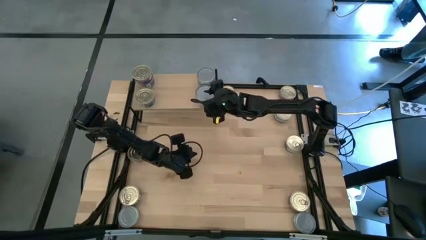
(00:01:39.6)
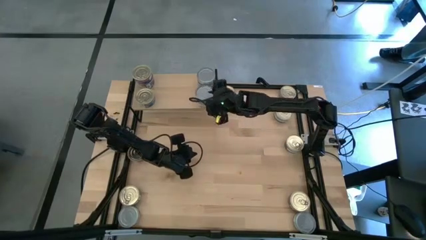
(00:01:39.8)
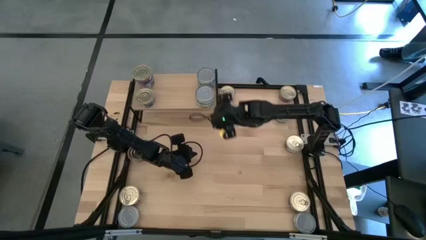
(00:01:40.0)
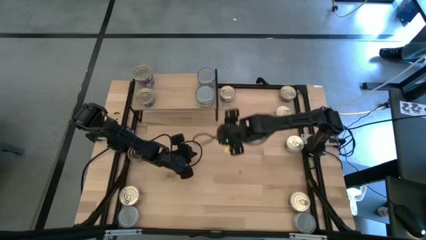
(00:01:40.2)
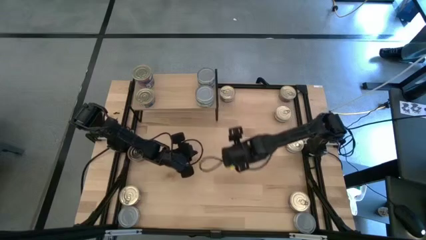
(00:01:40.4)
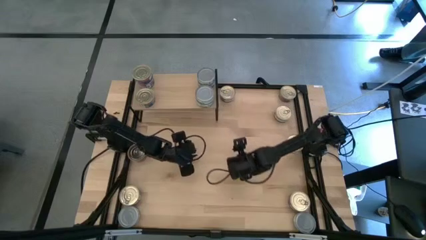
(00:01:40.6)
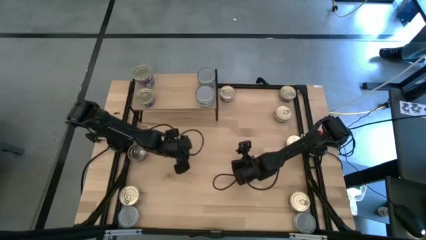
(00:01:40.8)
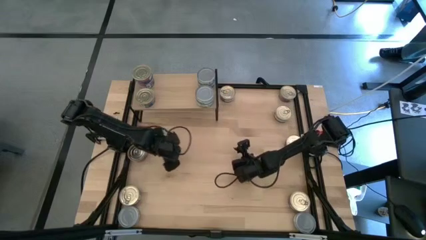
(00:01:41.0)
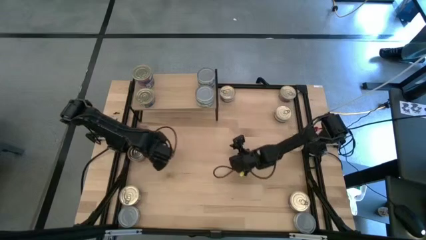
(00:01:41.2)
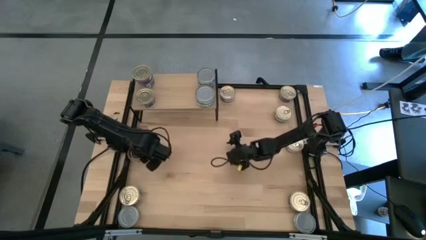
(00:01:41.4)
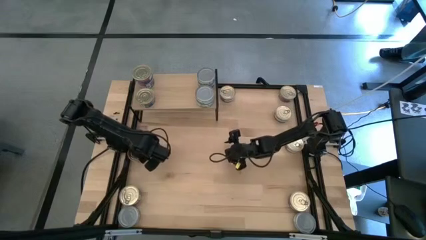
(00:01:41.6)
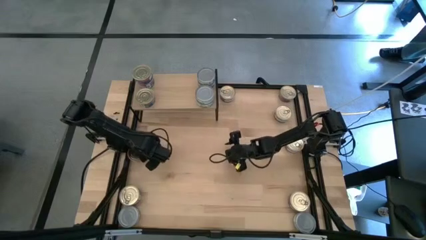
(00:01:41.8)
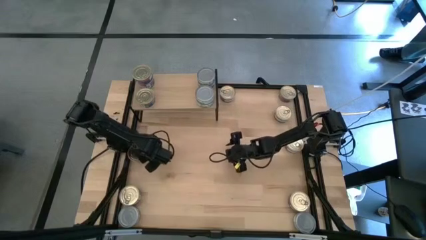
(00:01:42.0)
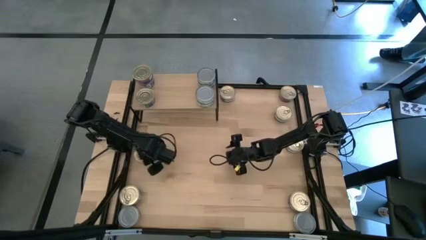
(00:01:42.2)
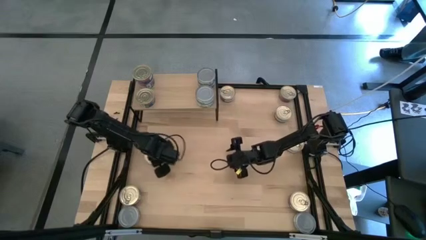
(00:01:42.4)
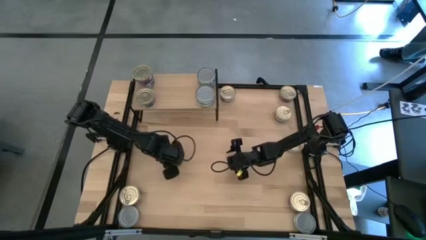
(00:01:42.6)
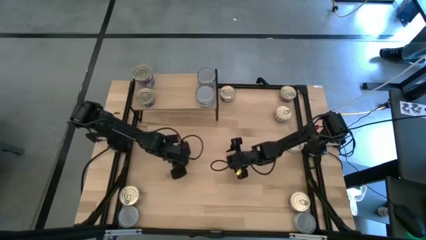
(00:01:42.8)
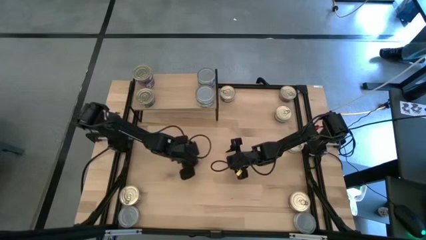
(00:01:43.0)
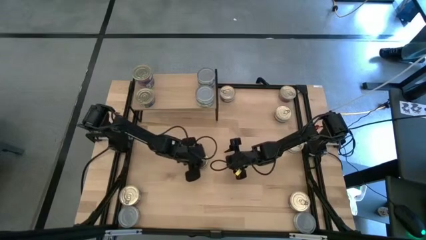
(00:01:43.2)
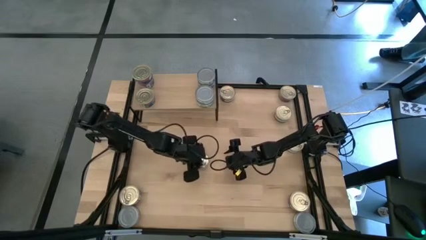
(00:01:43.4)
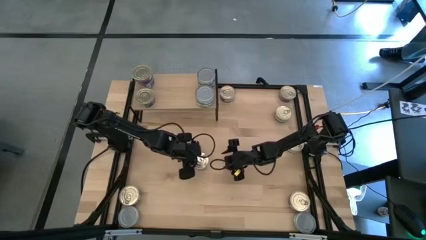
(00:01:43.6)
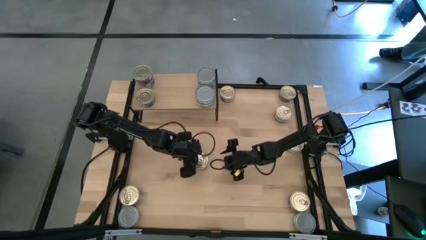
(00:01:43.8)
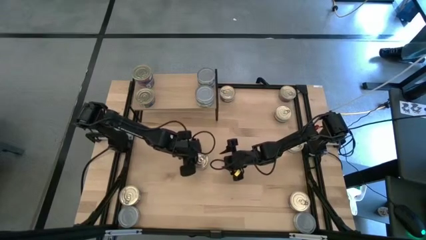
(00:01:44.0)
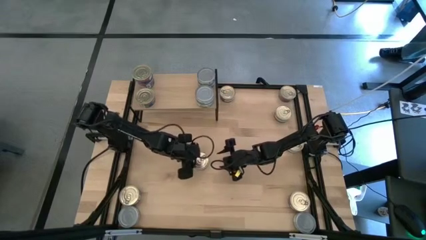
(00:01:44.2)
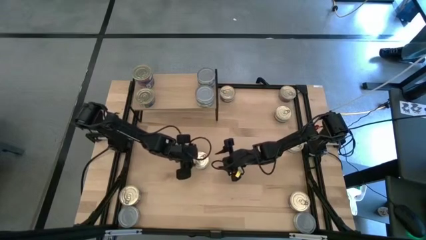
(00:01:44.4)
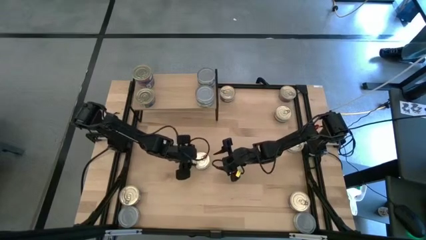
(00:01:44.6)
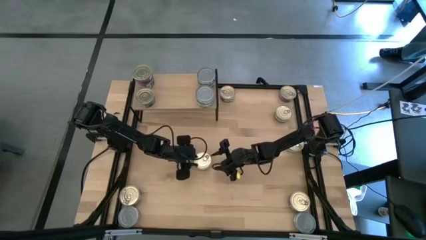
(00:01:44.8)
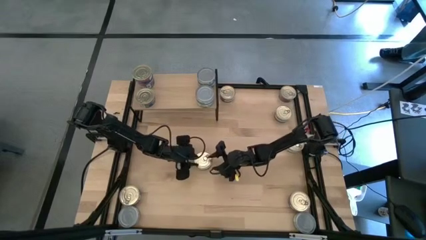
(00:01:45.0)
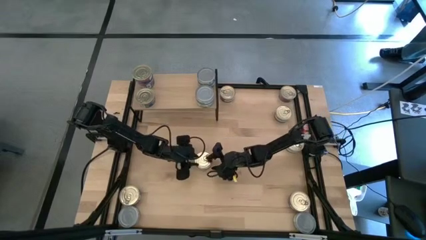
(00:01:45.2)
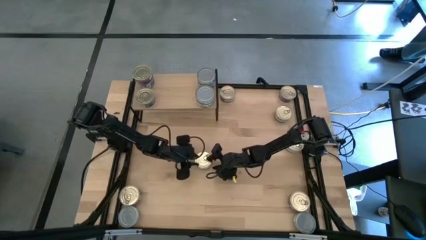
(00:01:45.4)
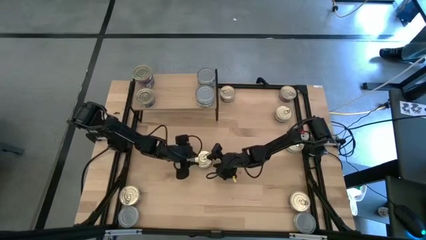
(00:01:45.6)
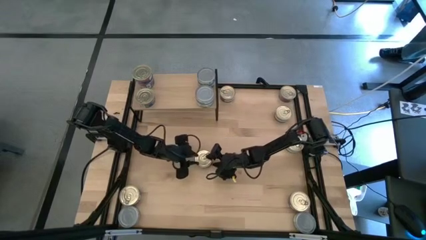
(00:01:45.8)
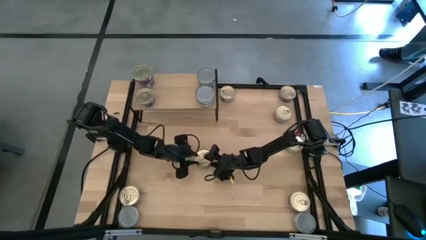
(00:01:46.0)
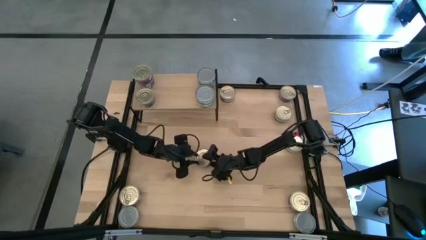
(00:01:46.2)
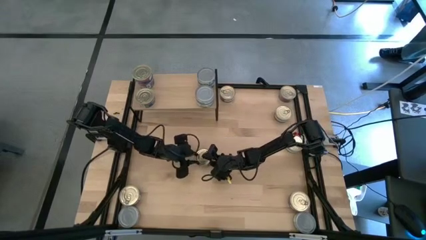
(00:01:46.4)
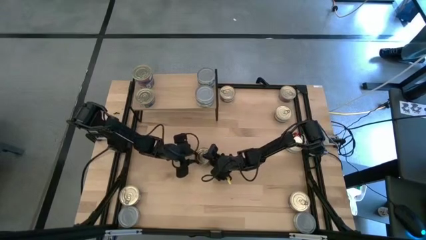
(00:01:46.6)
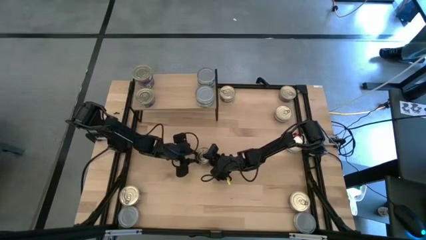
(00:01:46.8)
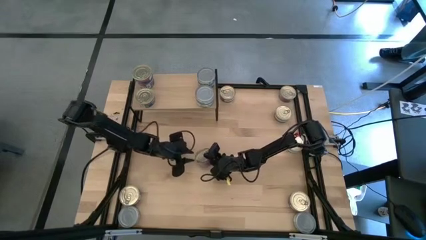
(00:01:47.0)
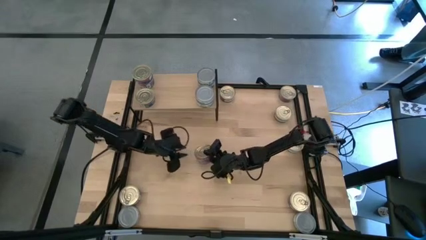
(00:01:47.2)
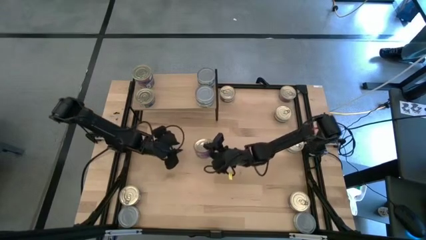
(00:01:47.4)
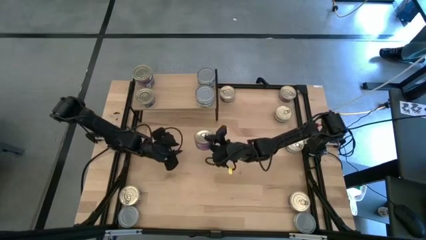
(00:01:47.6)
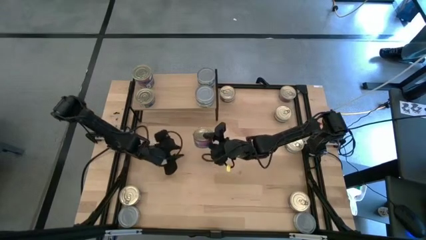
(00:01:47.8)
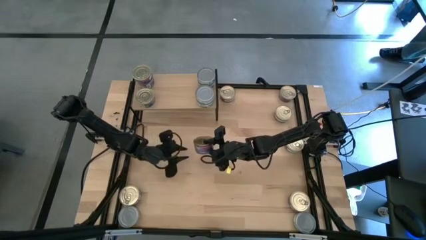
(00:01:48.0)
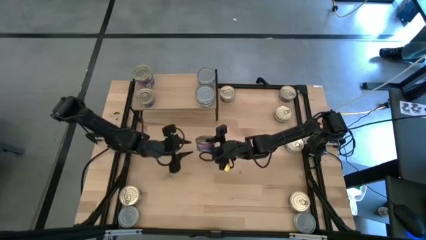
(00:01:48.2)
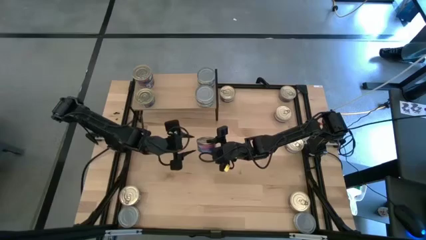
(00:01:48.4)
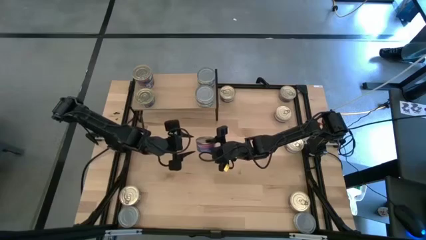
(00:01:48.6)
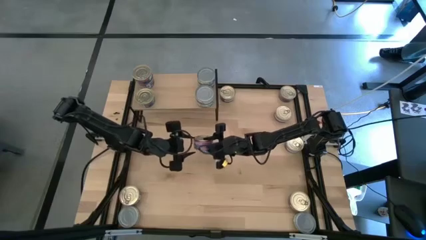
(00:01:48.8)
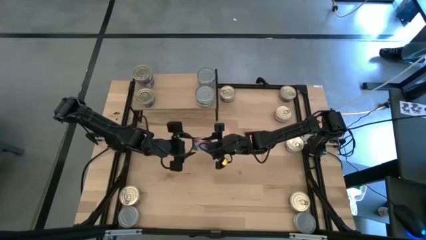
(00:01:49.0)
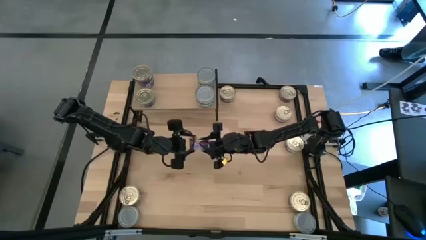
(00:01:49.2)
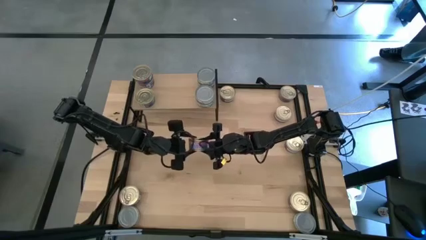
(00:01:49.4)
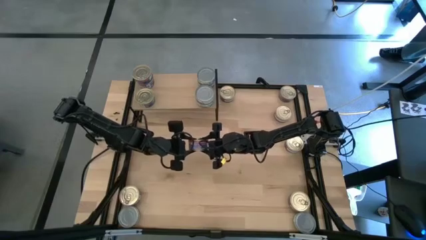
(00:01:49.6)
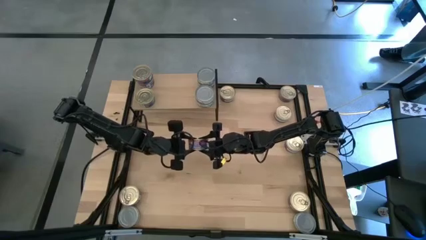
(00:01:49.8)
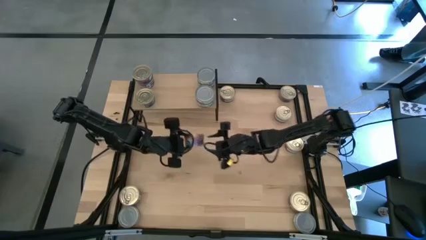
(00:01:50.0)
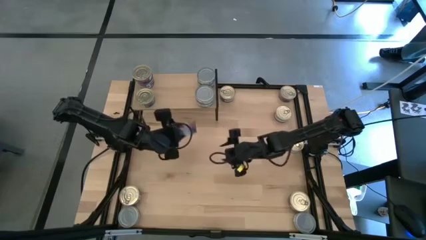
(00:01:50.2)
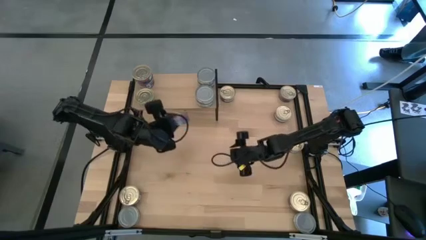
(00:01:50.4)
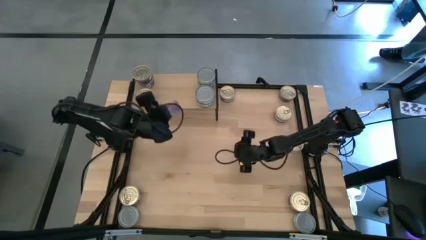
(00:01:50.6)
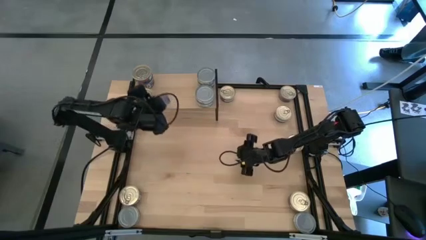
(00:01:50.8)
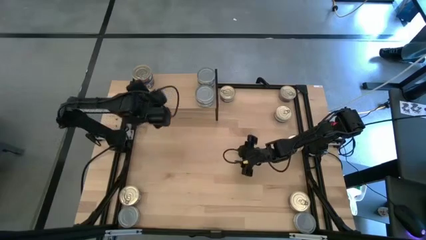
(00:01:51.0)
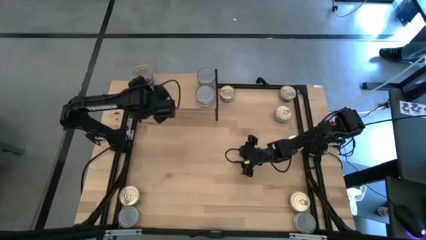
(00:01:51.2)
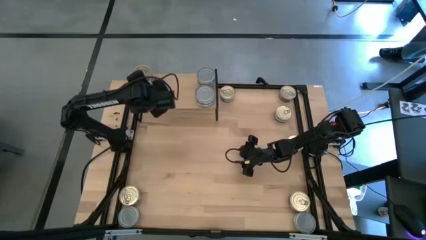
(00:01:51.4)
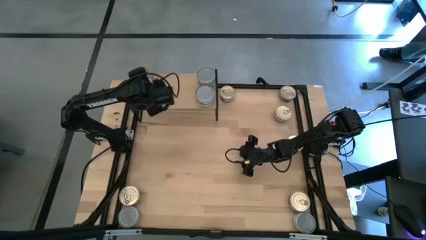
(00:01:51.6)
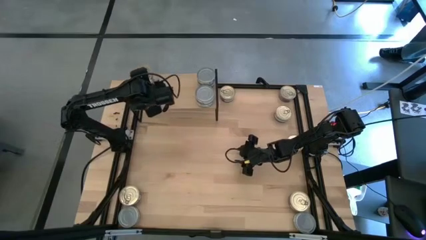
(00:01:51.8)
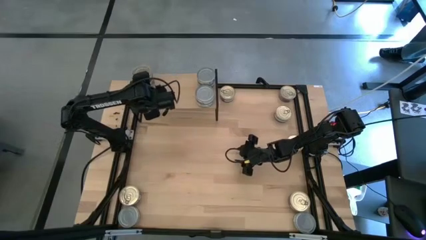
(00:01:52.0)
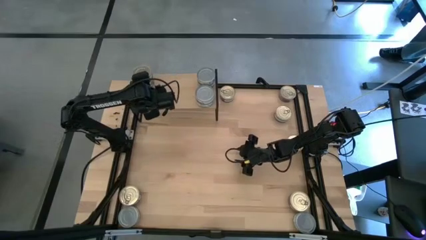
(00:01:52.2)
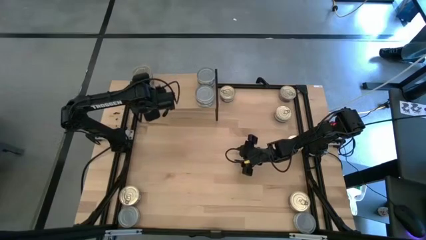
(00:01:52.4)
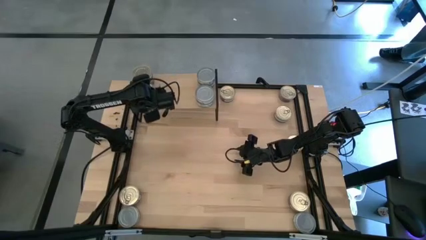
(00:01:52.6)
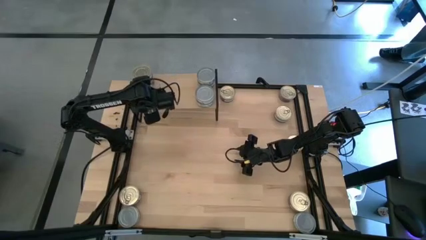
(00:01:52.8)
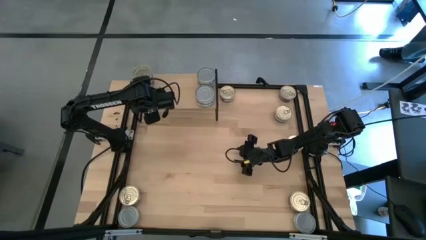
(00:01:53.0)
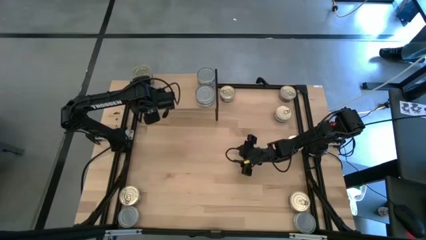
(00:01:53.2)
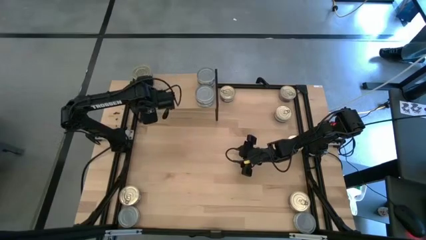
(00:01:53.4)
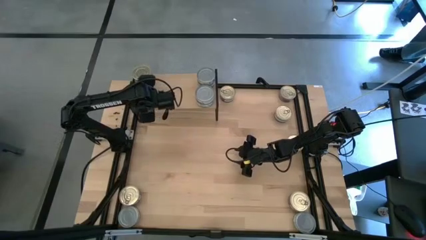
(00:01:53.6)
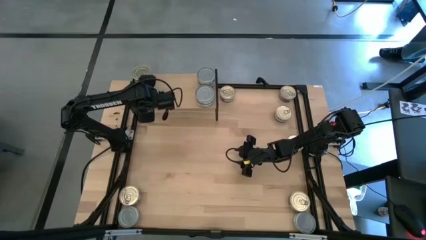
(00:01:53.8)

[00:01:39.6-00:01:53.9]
Task: Stack canned seafood by type on shelf
Stack the blue tuna can on top of the blue tuna can on the shelf
